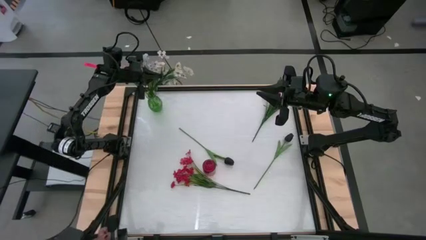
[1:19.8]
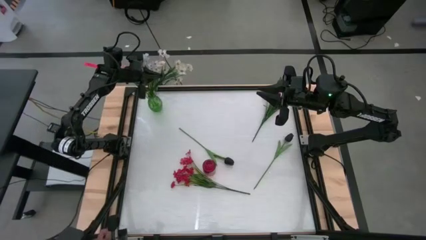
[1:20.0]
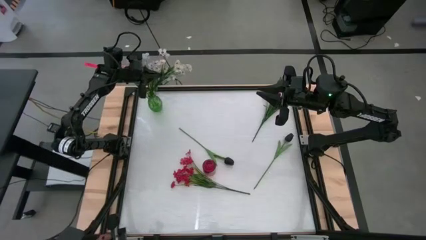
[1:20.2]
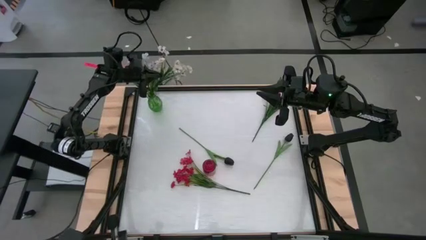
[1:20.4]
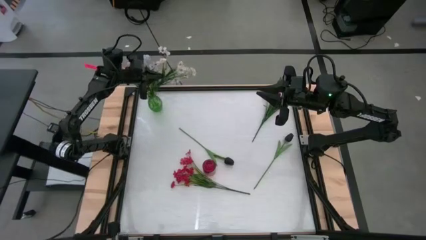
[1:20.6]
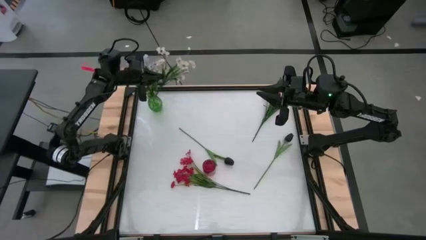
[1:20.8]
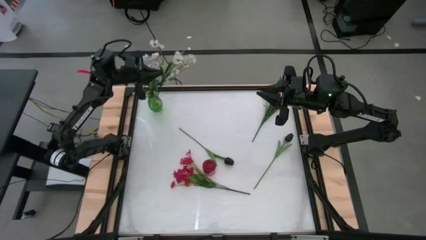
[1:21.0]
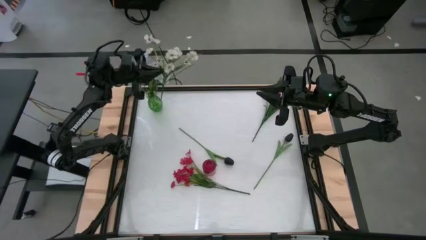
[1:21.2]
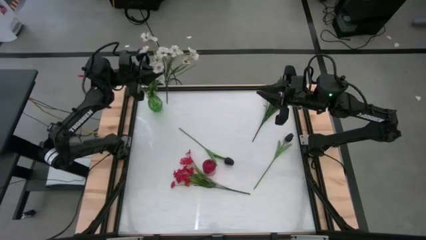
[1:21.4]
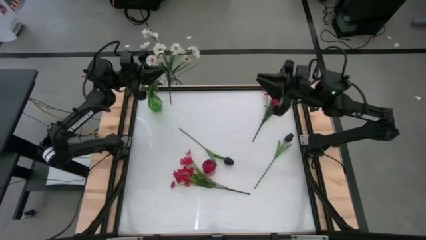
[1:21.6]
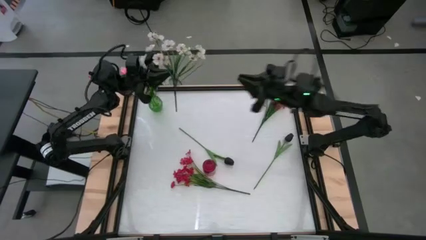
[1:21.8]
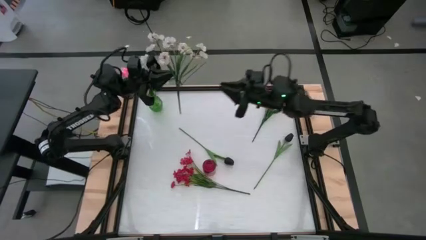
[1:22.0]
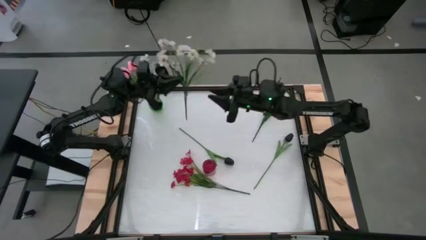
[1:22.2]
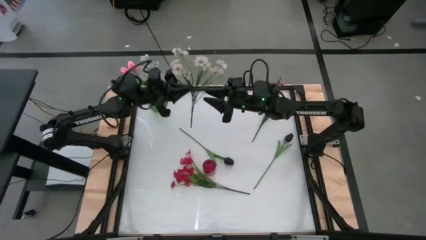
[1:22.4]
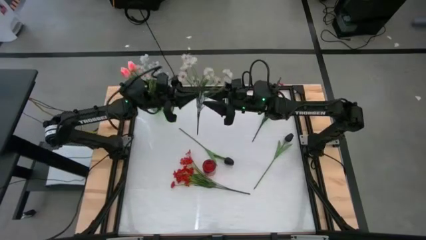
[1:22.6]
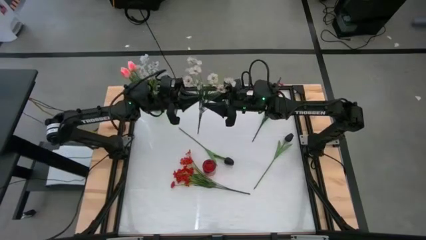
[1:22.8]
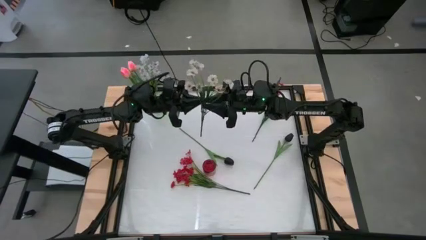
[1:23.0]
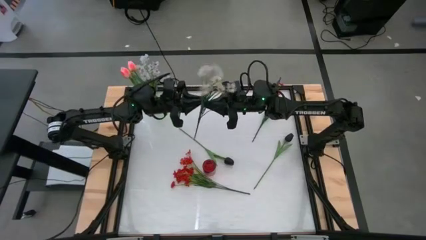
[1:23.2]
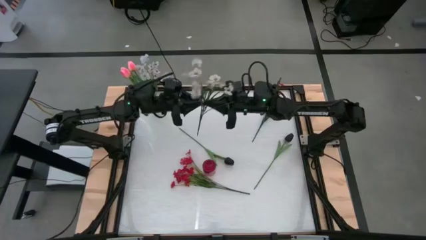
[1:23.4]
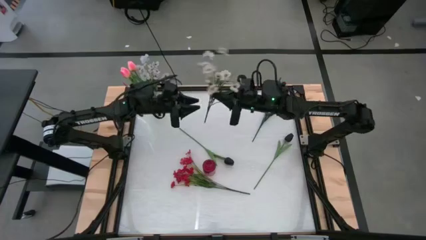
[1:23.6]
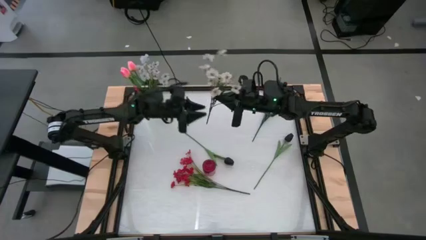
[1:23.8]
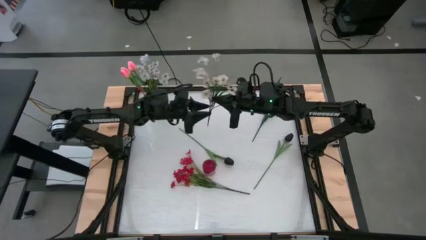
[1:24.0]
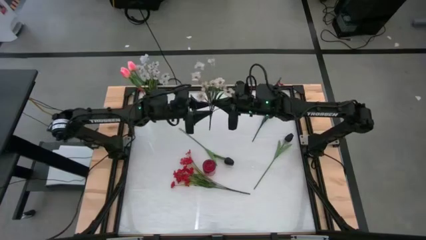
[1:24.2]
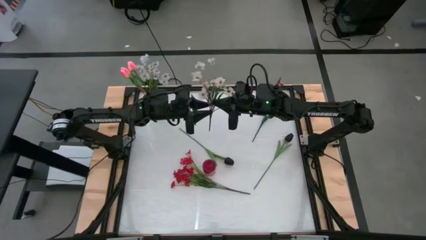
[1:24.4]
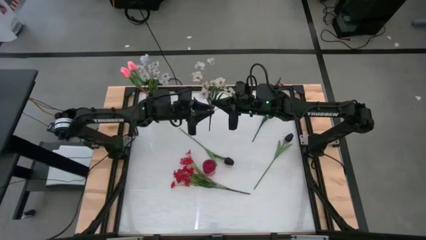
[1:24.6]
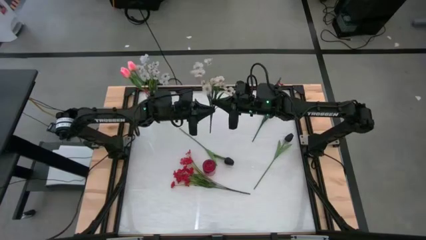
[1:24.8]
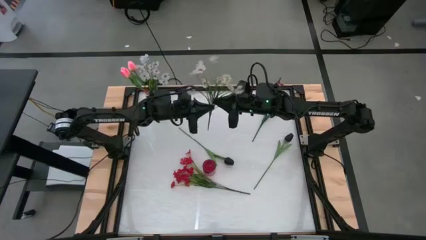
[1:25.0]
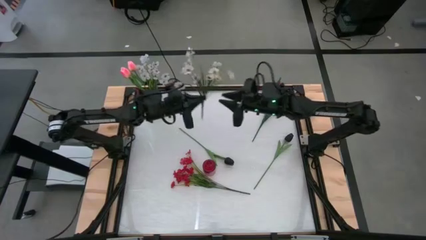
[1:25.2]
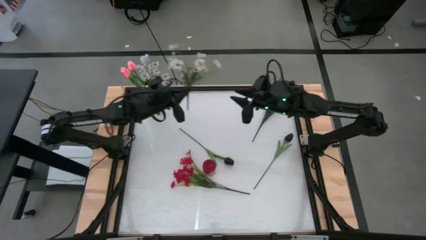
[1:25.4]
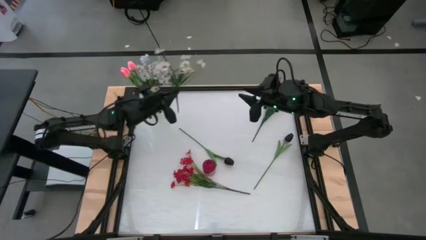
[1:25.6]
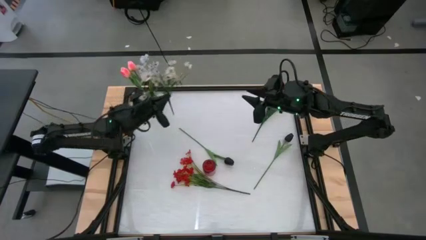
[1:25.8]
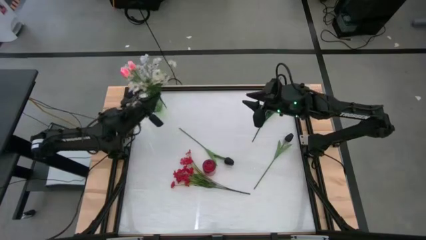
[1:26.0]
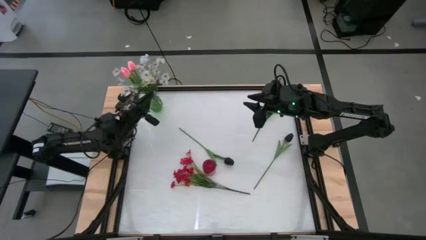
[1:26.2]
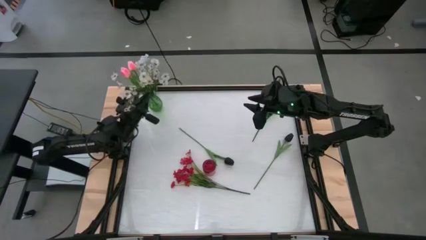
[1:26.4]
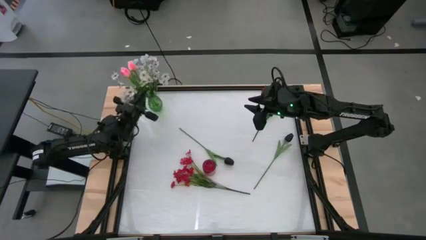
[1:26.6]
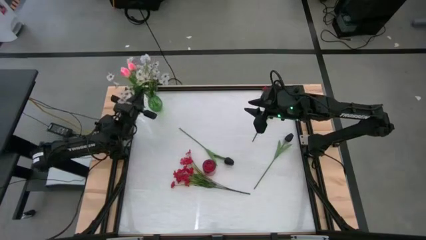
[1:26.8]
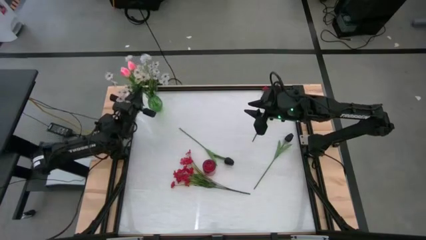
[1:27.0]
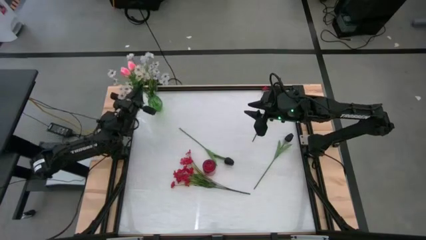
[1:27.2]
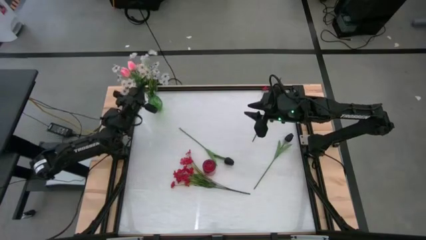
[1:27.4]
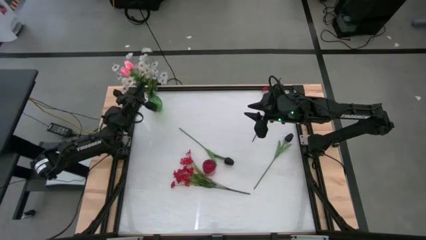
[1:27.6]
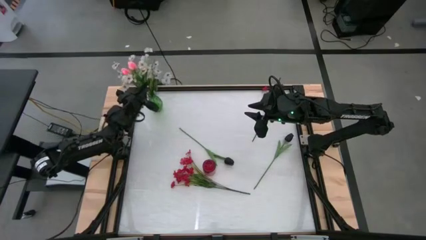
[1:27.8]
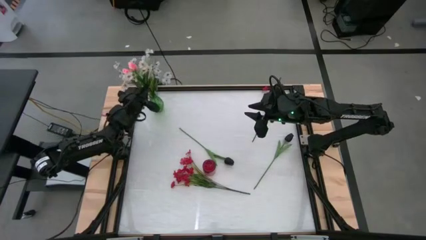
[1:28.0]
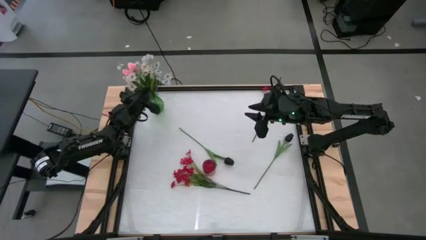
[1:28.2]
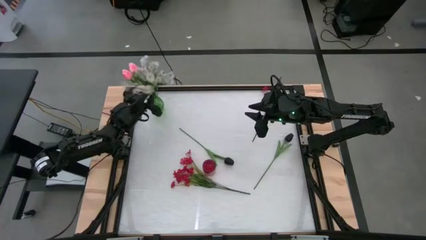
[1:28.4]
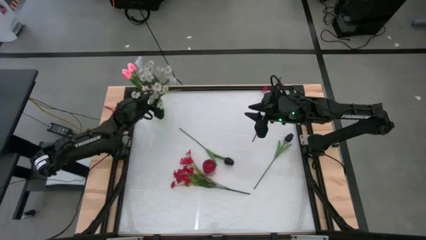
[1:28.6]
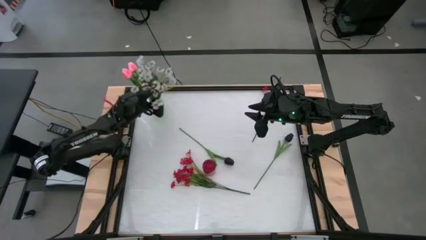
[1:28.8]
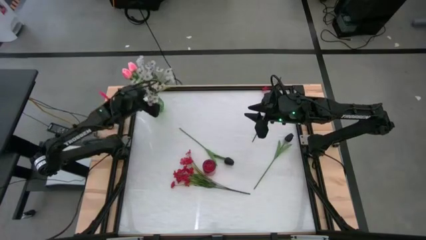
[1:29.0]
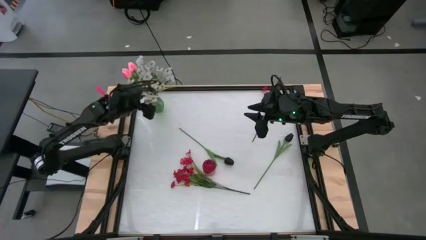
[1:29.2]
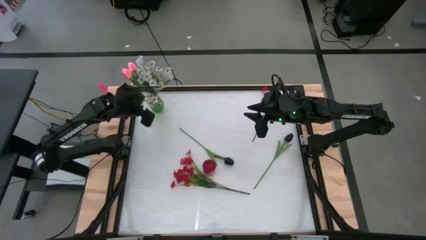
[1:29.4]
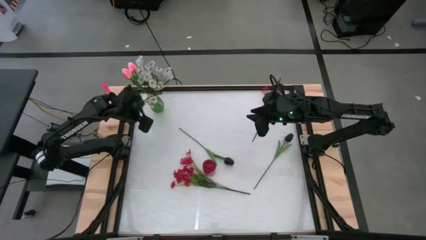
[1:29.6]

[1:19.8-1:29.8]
Task: Sort flowers into vase by color
Put the white flowers into the green flower vase

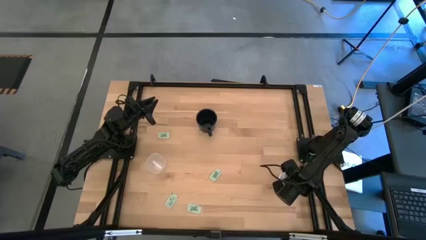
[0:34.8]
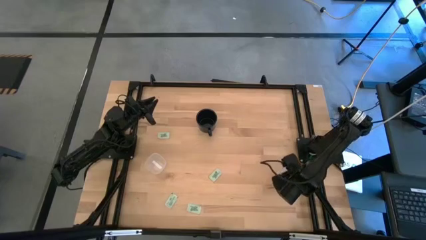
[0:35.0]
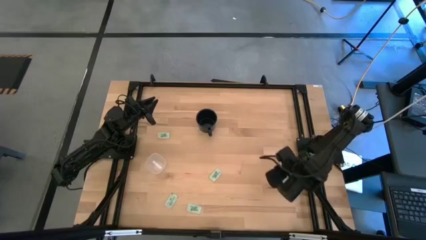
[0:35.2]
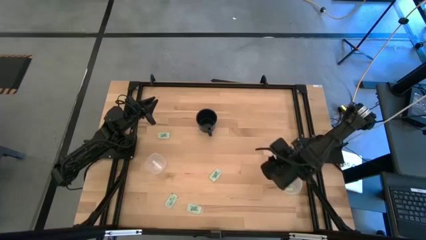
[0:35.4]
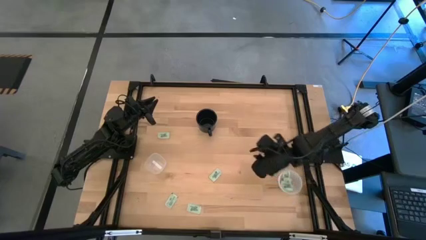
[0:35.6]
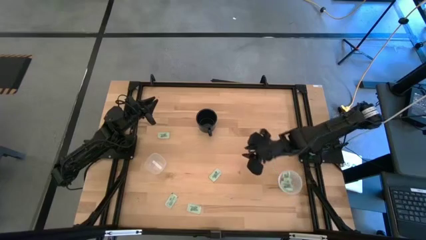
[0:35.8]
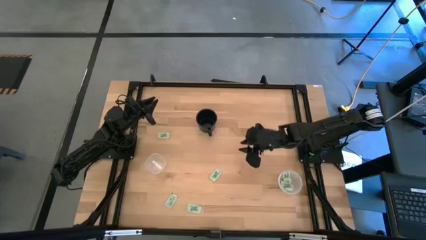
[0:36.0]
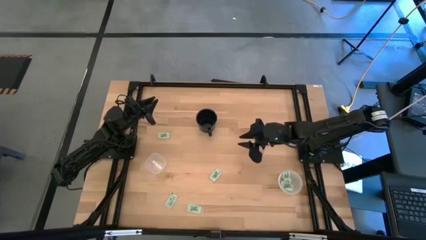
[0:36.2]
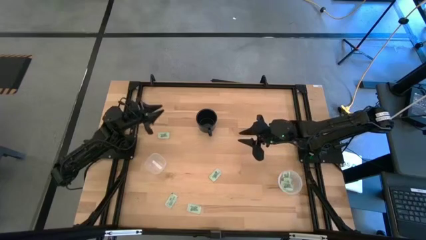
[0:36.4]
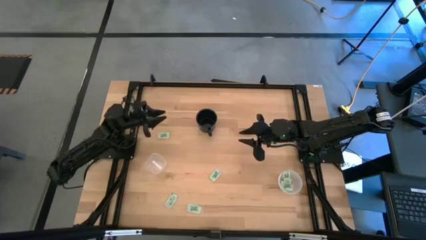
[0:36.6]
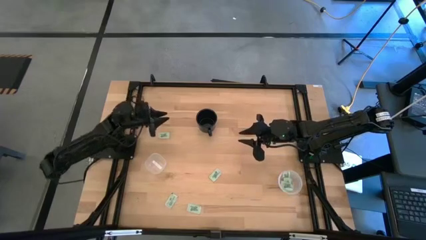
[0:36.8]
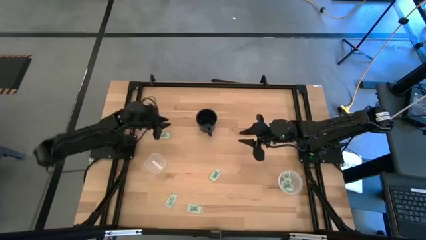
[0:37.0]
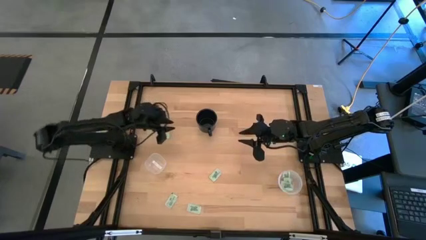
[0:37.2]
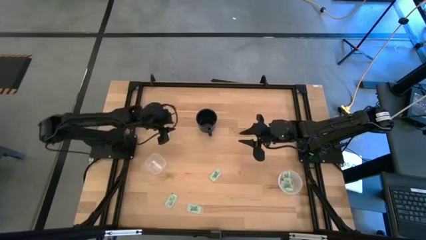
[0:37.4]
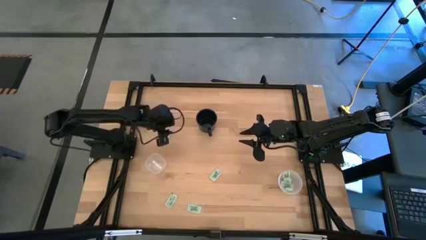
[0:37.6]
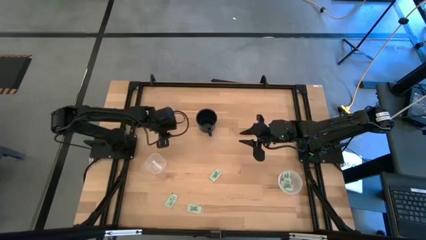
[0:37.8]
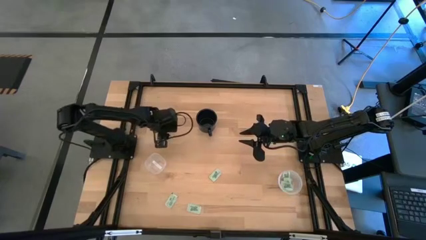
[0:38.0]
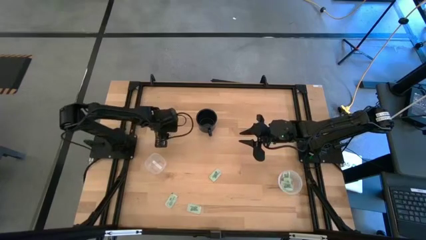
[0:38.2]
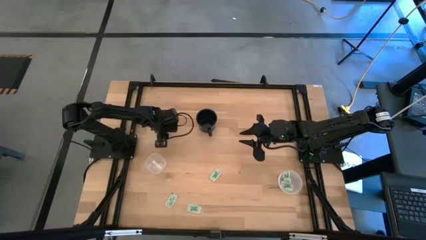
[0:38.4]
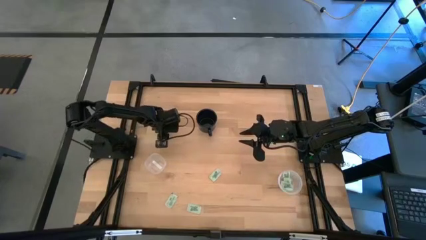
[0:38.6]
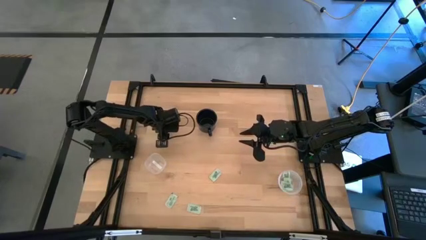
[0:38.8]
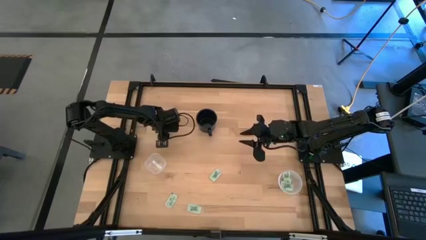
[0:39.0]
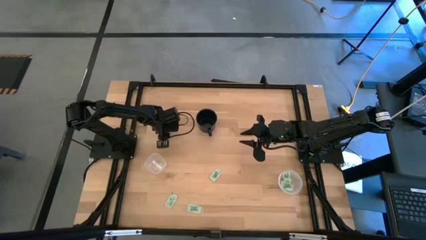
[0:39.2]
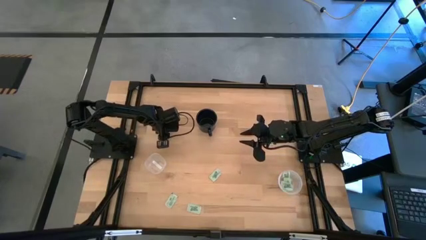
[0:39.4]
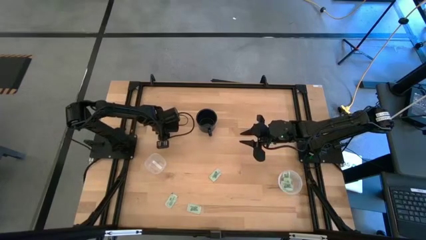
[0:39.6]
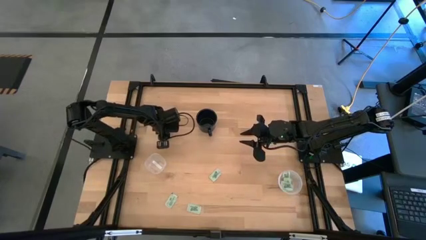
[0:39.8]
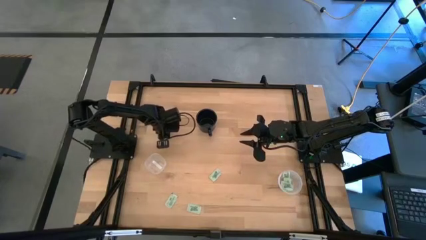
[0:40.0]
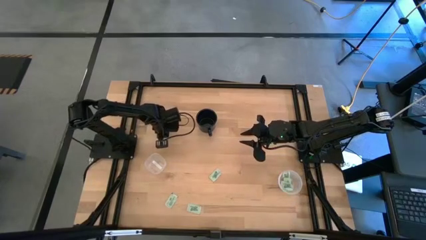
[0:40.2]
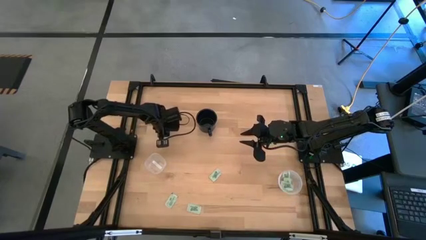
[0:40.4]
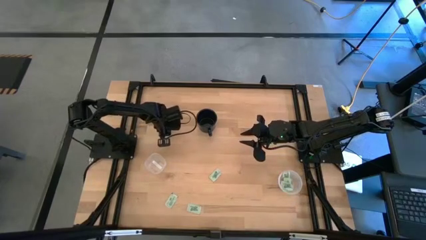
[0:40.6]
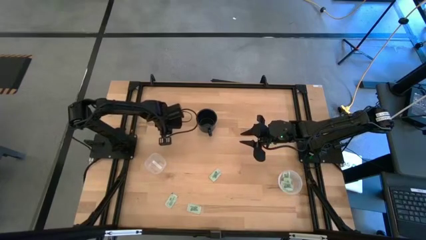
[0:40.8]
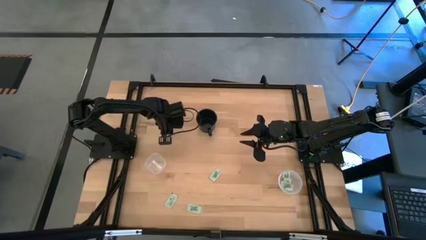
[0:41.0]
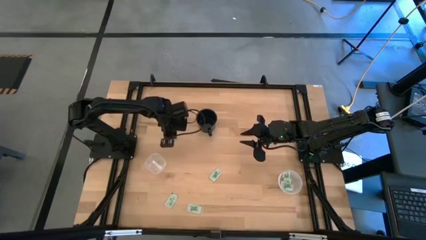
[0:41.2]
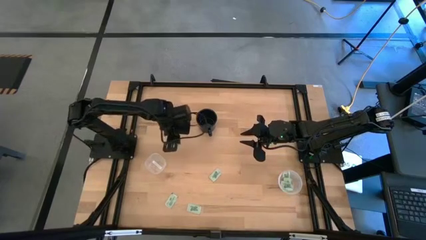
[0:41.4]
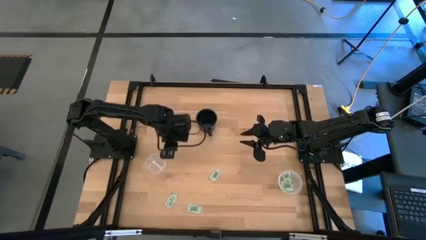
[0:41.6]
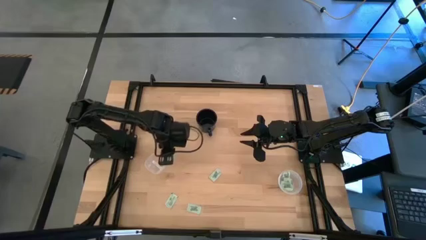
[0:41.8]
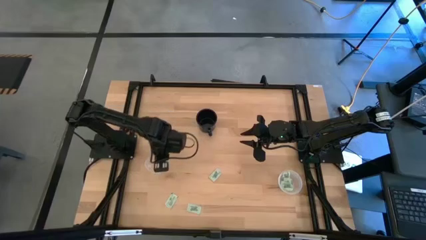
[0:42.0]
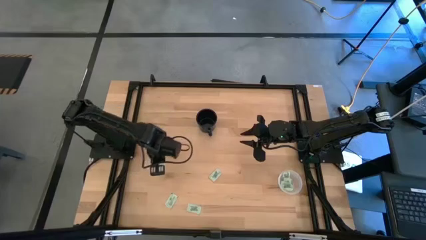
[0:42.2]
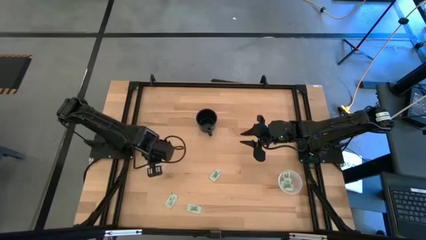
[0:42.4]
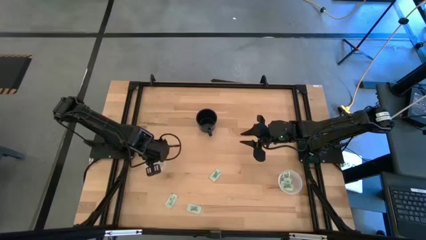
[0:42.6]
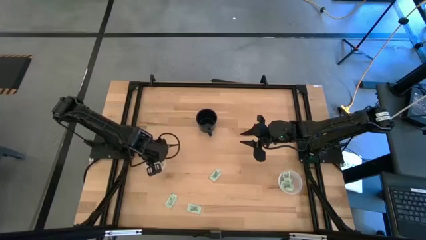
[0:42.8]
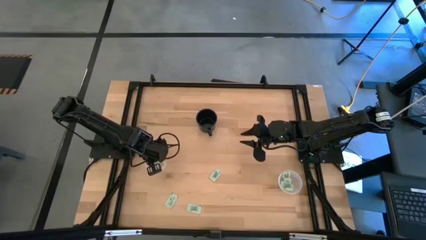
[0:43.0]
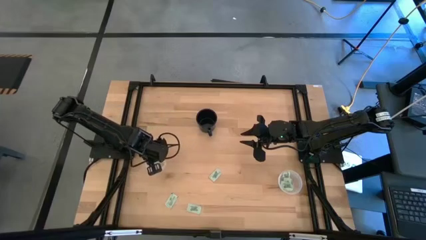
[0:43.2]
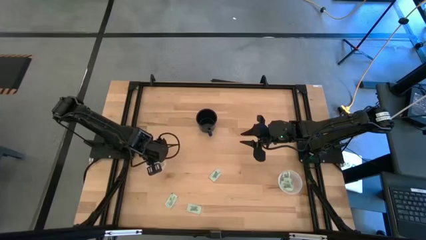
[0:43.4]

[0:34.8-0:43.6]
Task: Pick and place Stevia / Truvia into bins
Put the stevia packet into the left transparent container
